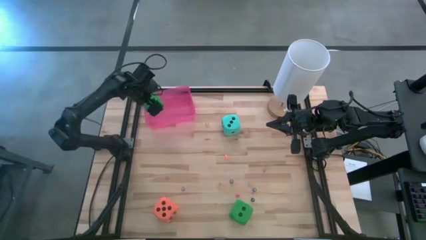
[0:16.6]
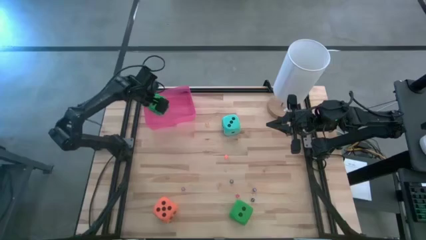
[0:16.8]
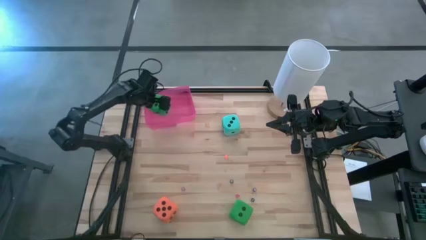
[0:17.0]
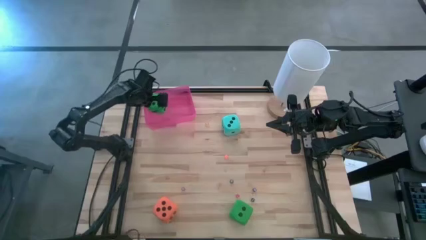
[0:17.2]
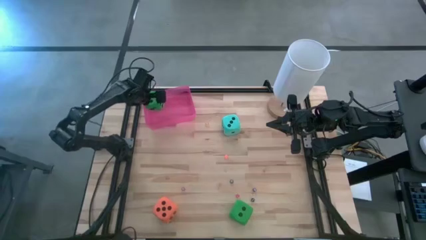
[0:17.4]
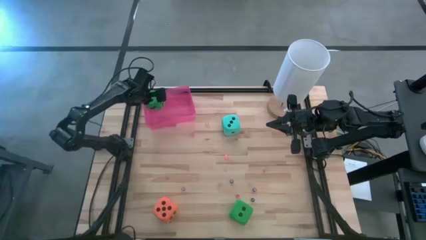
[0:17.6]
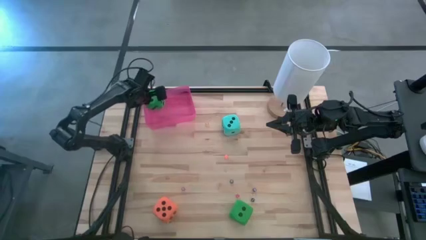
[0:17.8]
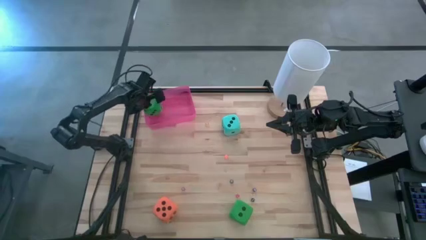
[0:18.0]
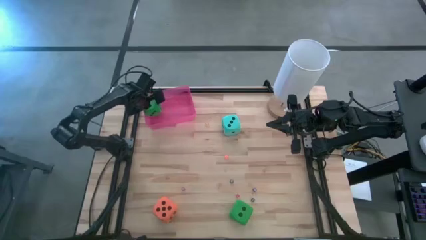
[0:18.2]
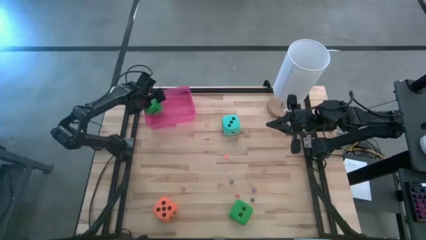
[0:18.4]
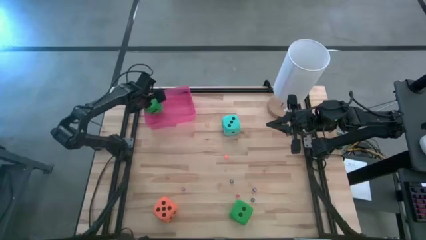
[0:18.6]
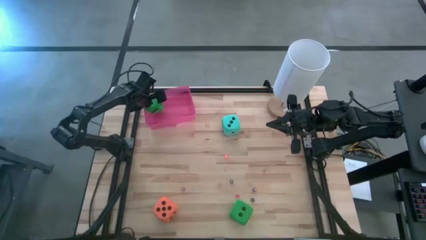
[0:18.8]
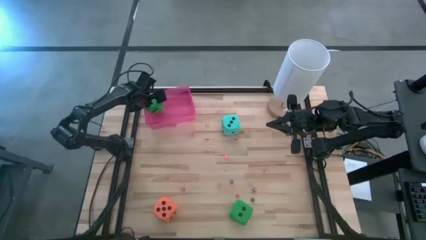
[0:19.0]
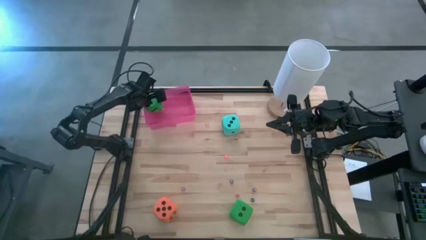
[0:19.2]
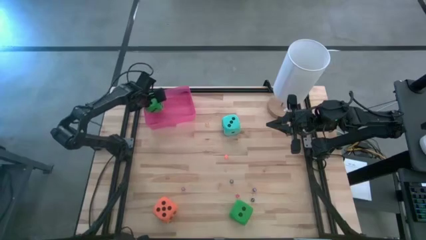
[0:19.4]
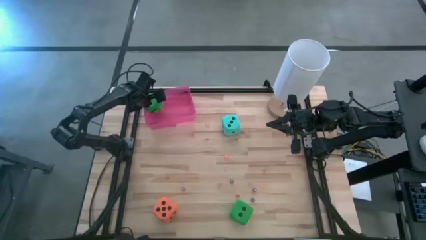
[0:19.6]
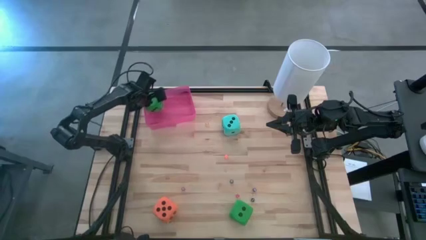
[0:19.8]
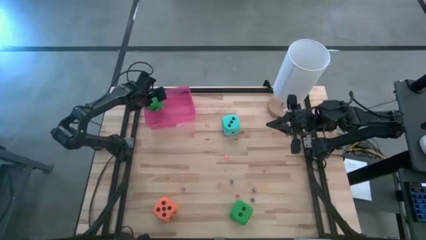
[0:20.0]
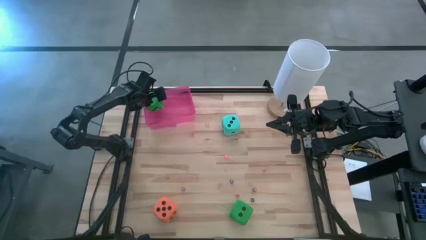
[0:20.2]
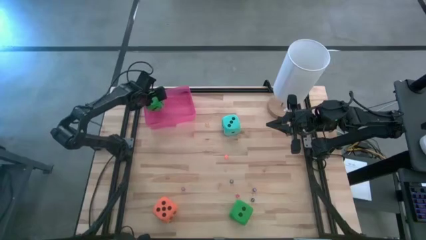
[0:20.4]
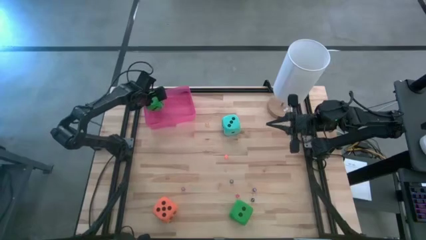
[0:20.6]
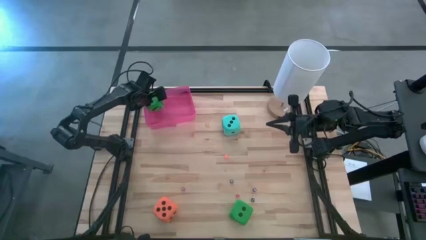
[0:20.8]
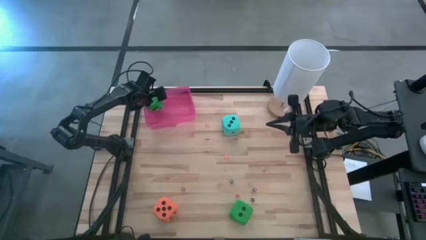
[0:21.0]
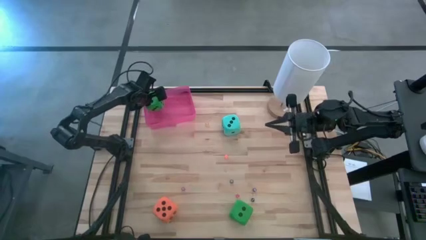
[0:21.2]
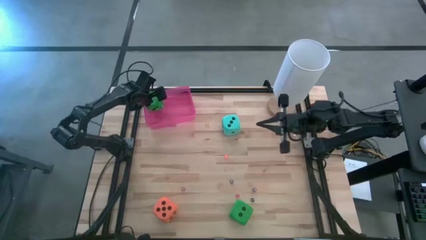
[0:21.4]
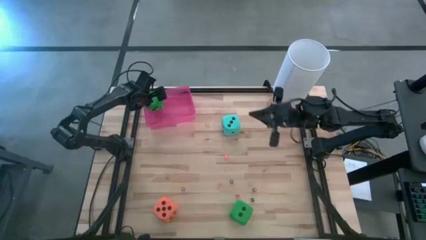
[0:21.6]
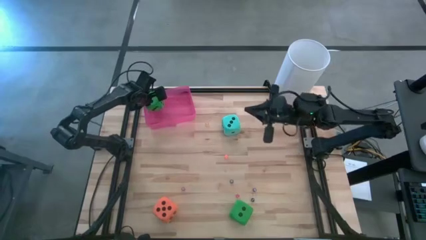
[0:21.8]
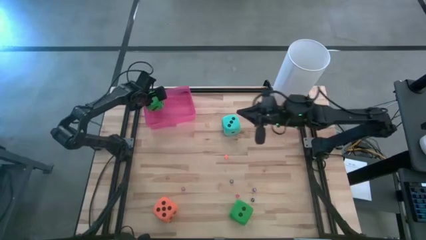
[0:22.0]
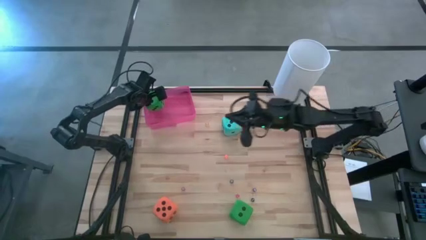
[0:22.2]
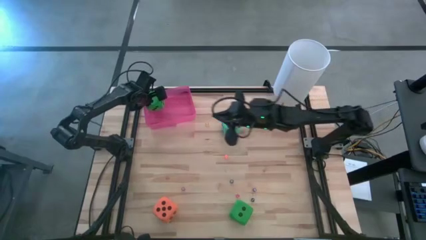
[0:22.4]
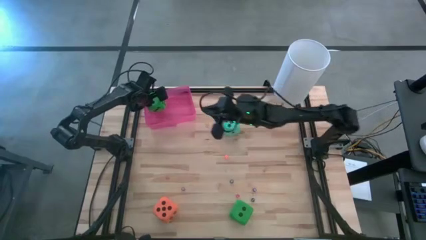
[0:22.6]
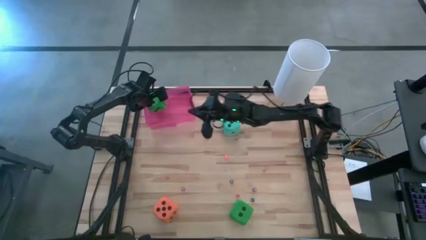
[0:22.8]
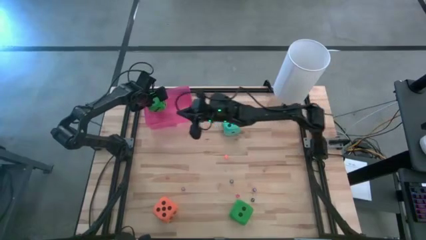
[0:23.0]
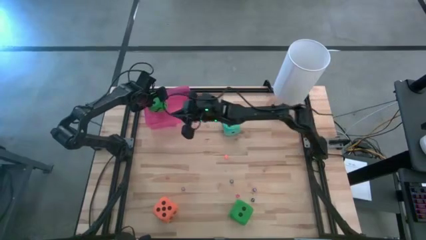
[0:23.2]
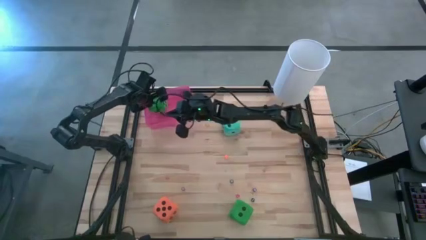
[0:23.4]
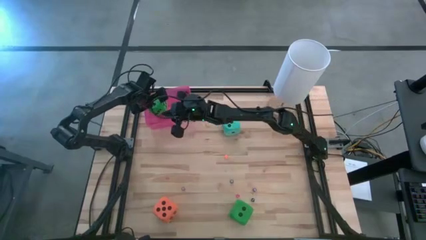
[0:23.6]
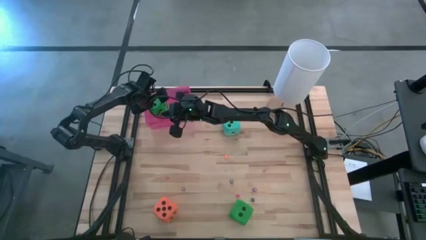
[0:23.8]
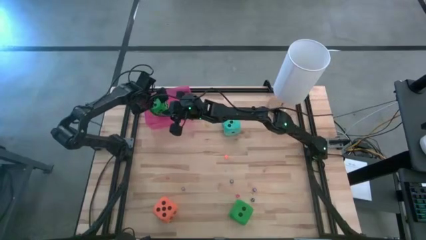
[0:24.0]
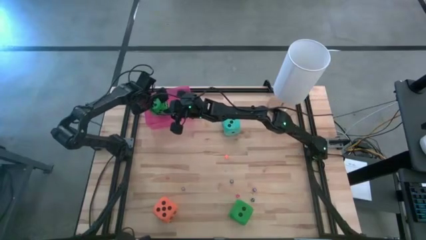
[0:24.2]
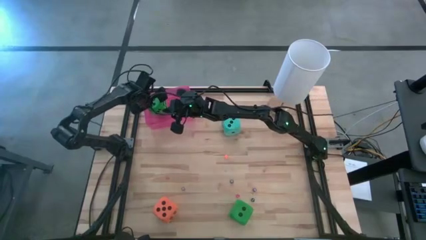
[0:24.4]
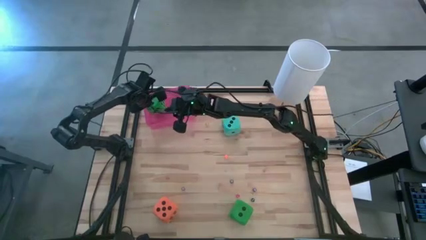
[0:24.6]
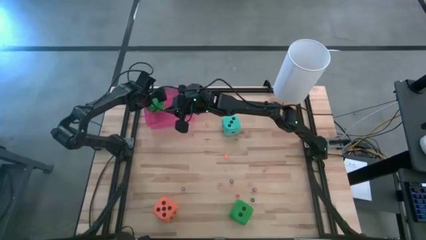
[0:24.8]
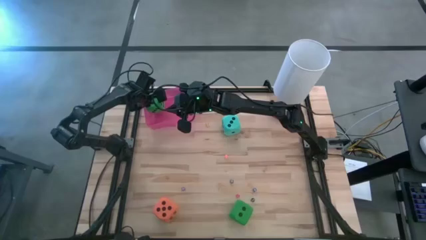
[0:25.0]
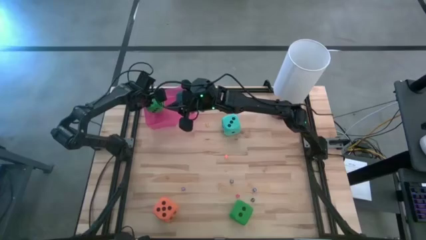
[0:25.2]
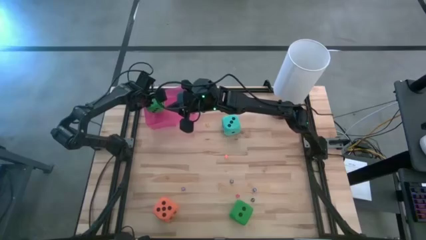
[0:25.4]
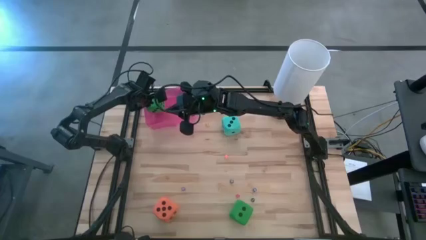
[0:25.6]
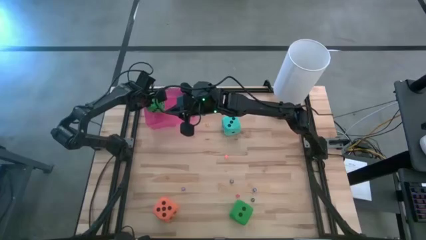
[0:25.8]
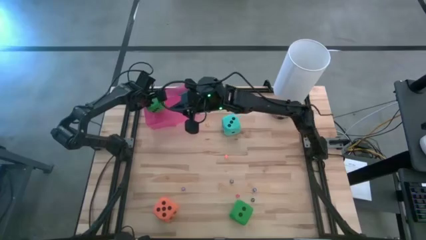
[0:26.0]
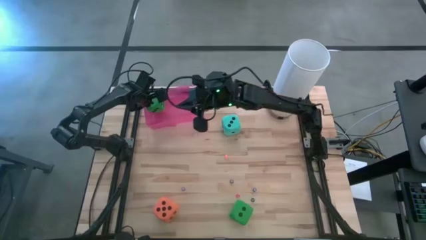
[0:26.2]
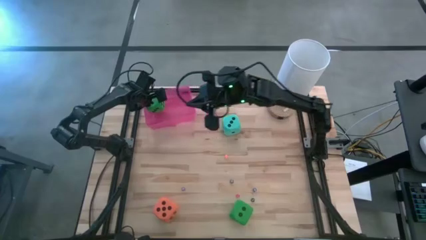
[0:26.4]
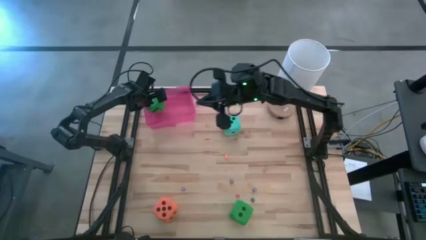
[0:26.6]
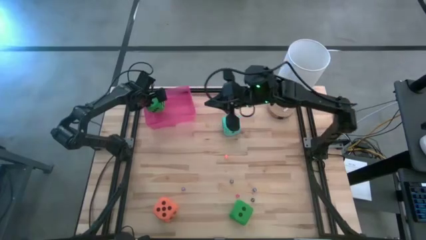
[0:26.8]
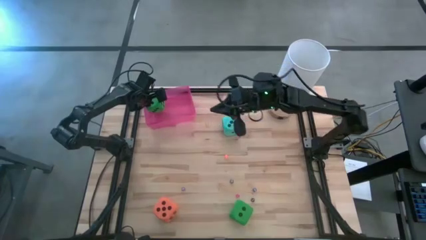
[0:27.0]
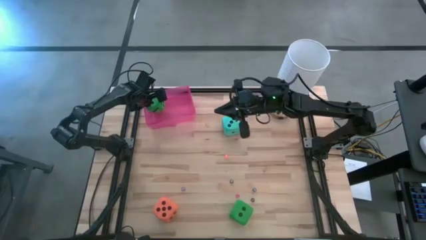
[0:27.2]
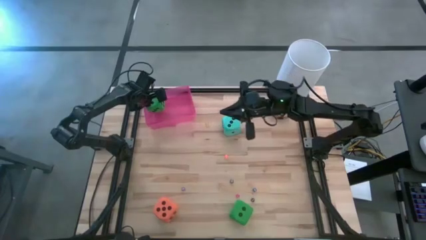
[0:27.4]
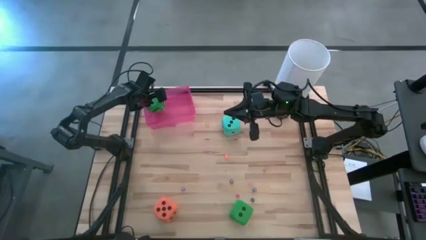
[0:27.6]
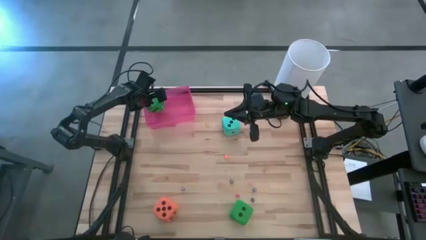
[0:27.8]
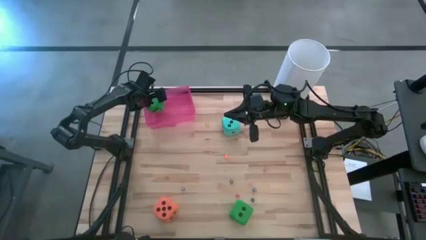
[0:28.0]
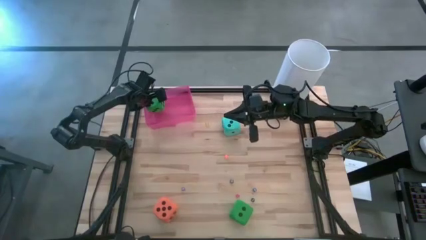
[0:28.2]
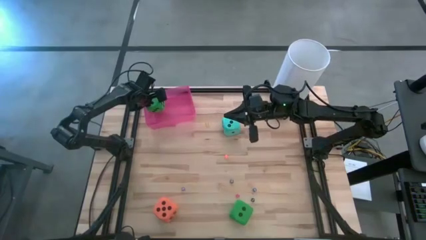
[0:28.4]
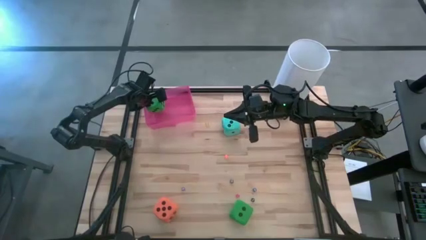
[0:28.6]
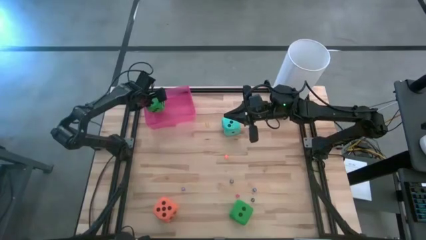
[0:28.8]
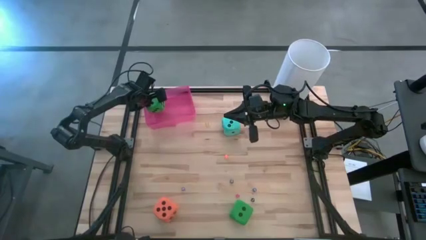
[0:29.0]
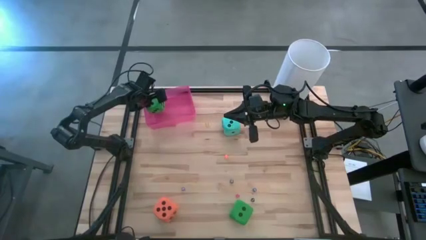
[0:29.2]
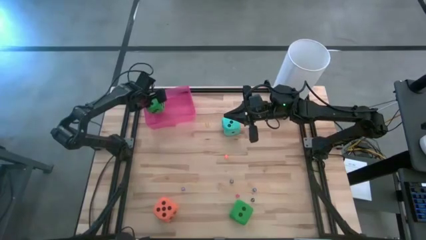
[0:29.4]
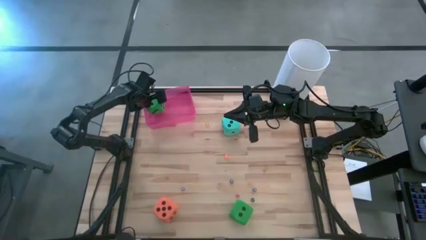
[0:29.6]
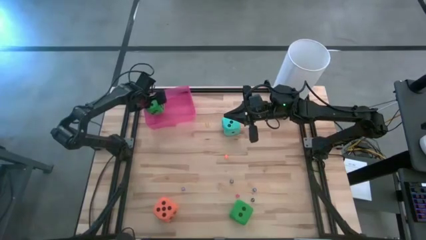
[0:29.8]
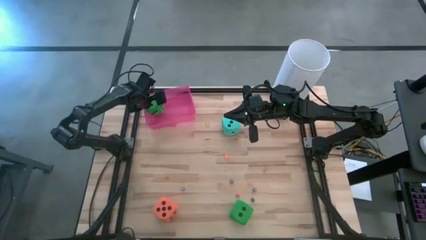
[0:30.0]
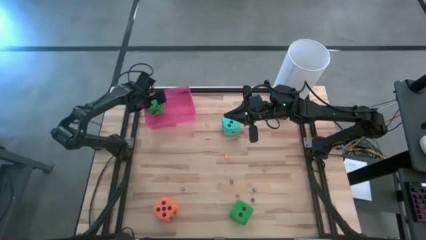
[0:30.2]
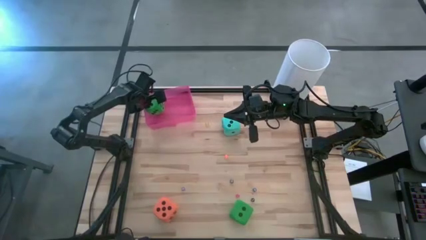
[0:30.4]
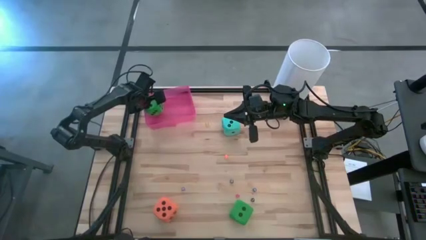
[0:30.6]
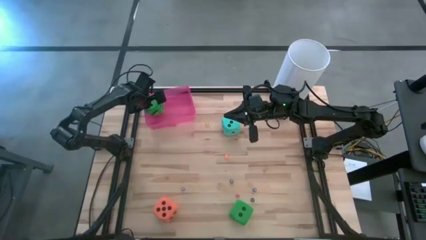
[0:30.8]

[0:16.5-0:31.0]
Task: Pick & Place Dice
Put the top big green dice into the red bin
